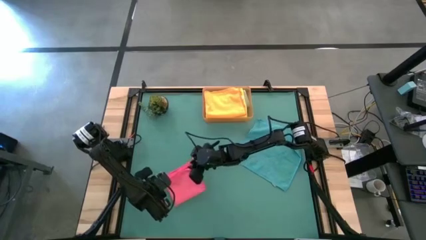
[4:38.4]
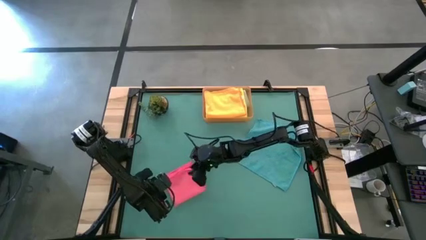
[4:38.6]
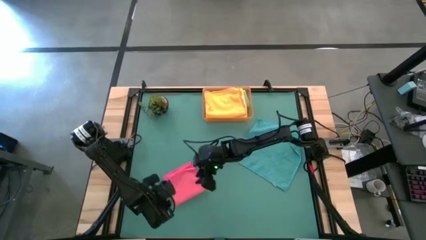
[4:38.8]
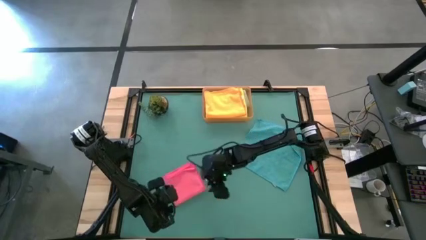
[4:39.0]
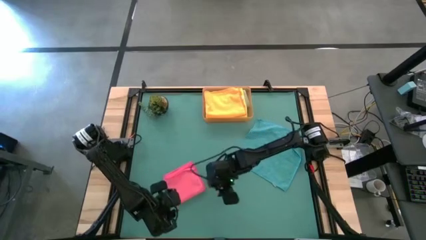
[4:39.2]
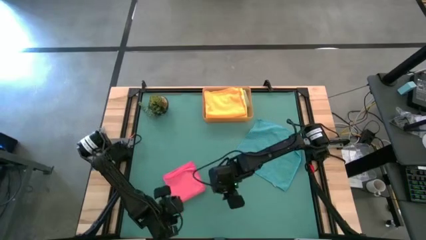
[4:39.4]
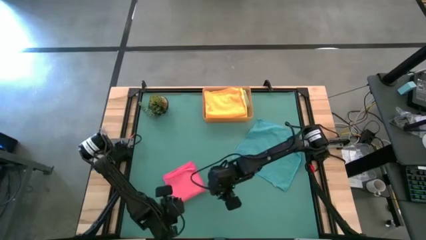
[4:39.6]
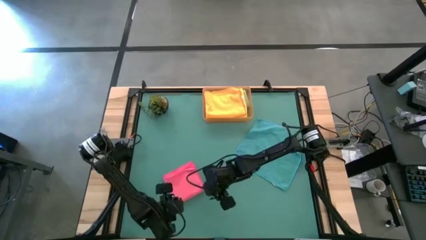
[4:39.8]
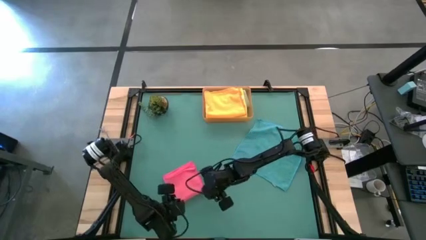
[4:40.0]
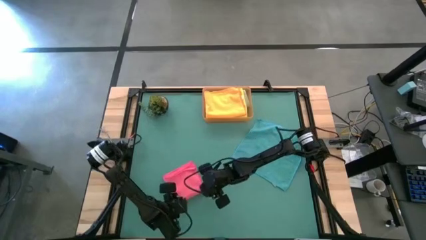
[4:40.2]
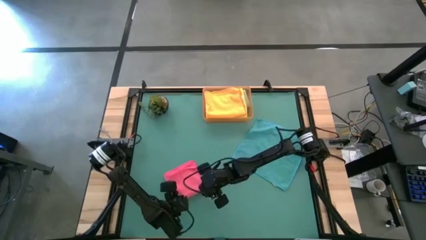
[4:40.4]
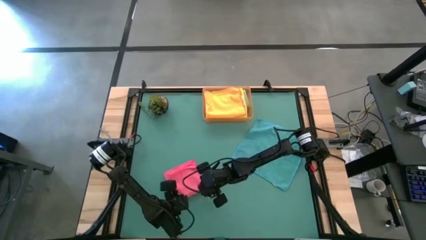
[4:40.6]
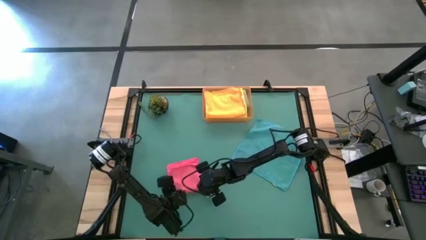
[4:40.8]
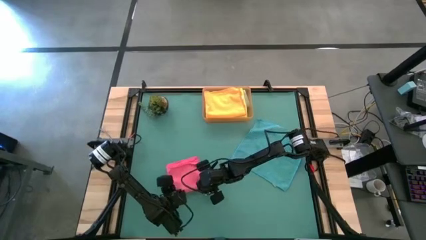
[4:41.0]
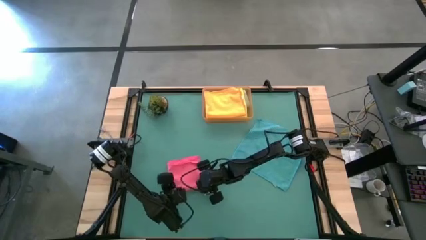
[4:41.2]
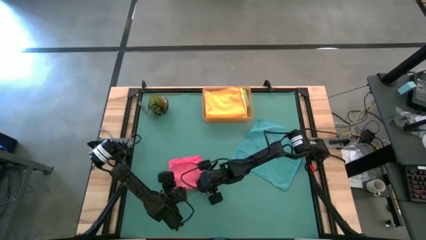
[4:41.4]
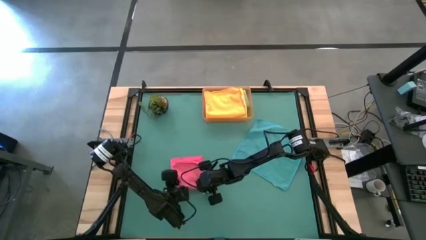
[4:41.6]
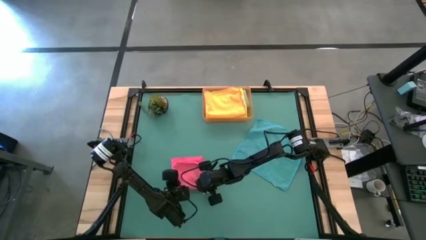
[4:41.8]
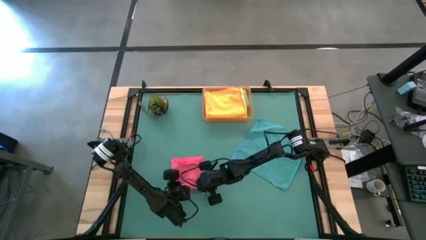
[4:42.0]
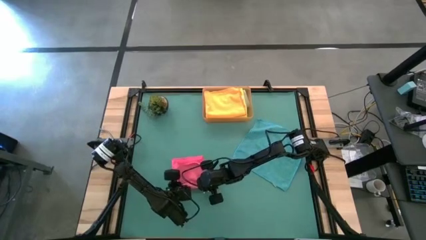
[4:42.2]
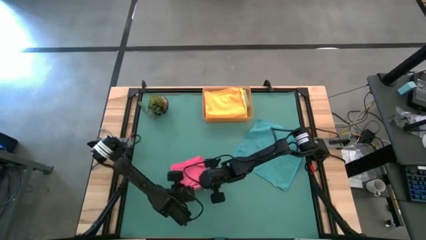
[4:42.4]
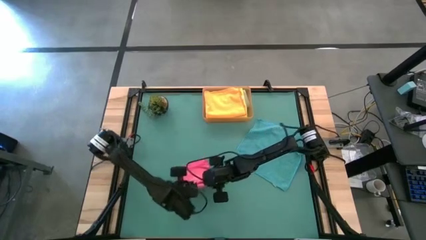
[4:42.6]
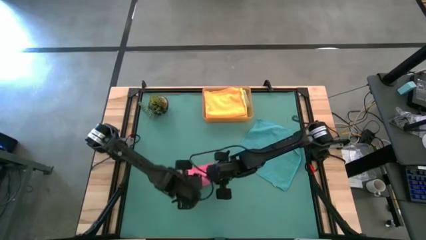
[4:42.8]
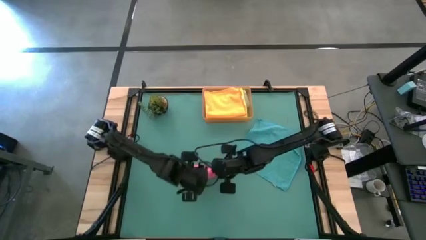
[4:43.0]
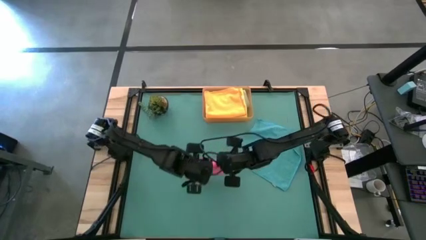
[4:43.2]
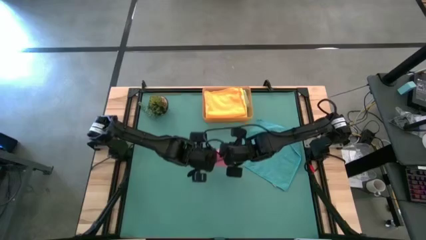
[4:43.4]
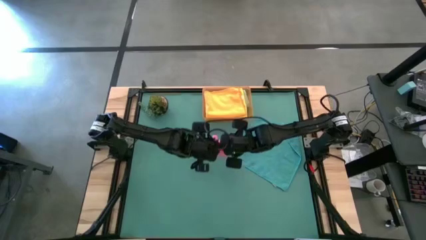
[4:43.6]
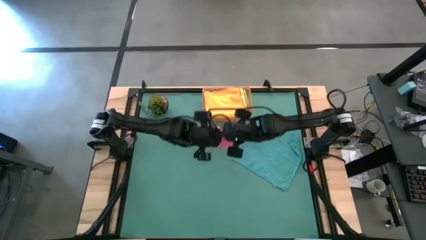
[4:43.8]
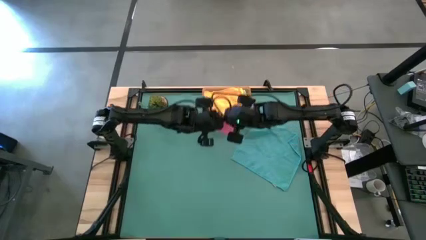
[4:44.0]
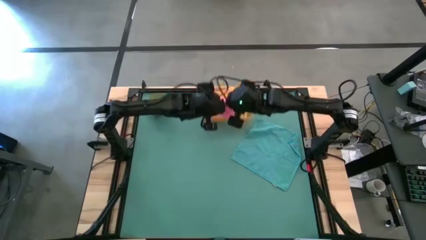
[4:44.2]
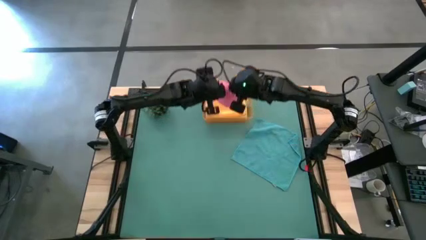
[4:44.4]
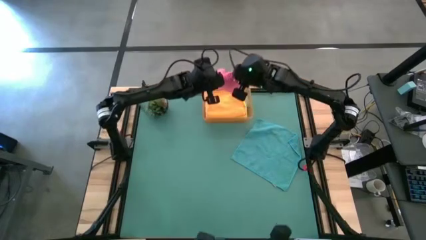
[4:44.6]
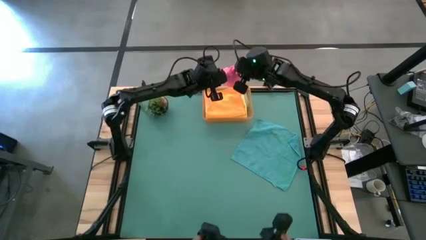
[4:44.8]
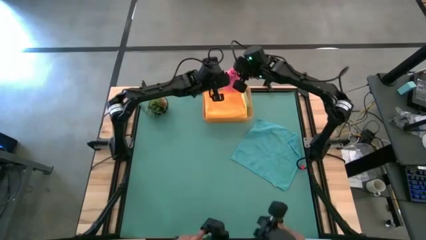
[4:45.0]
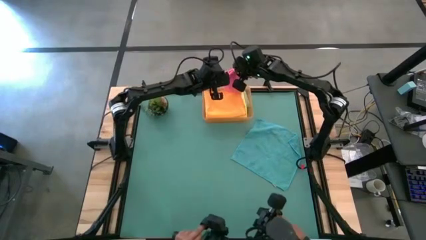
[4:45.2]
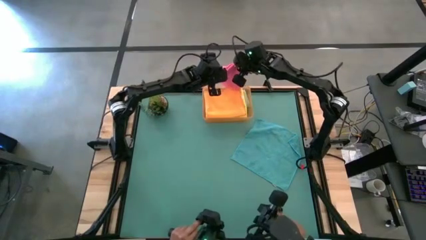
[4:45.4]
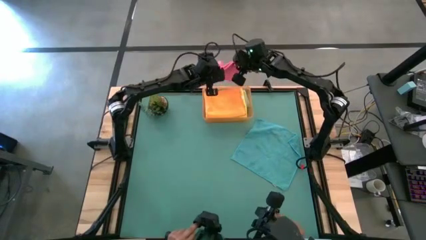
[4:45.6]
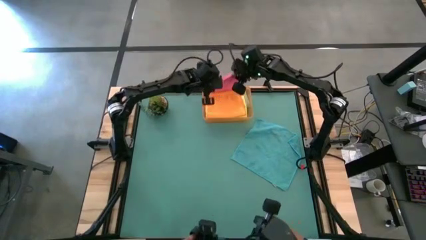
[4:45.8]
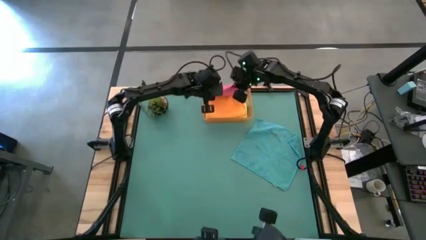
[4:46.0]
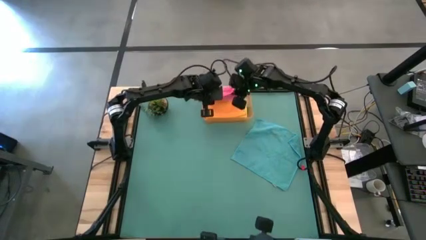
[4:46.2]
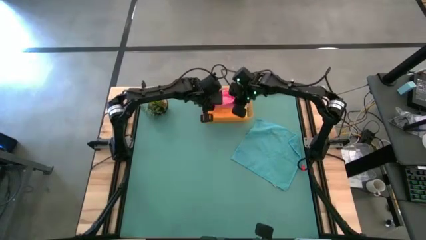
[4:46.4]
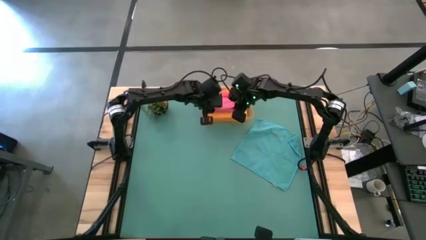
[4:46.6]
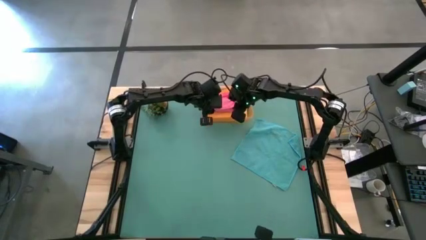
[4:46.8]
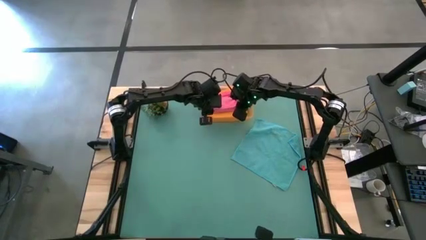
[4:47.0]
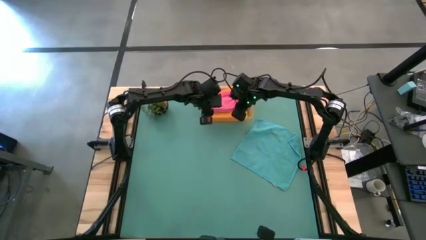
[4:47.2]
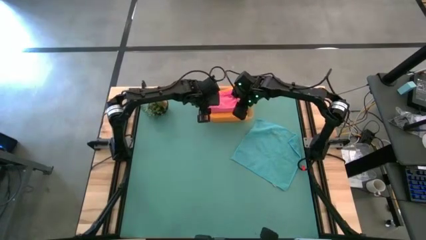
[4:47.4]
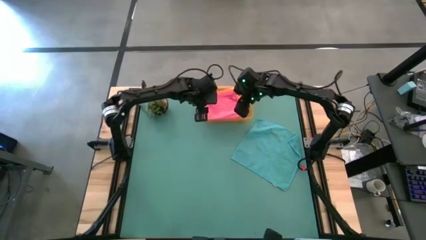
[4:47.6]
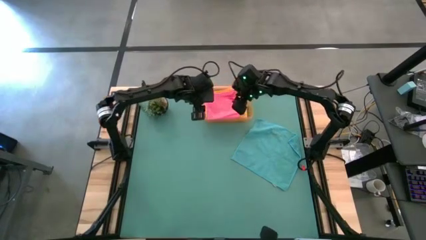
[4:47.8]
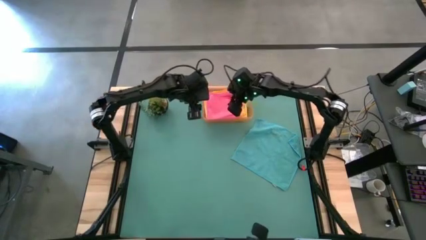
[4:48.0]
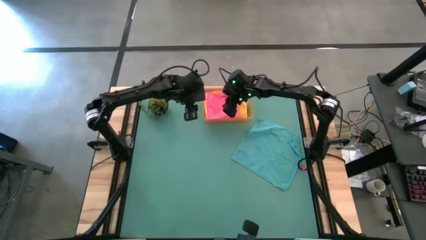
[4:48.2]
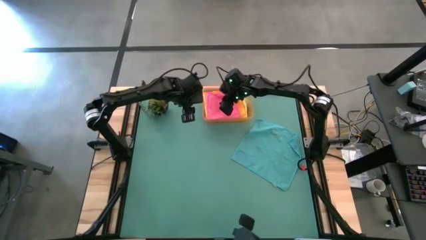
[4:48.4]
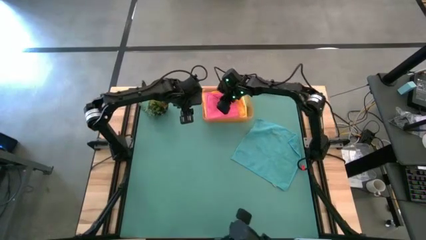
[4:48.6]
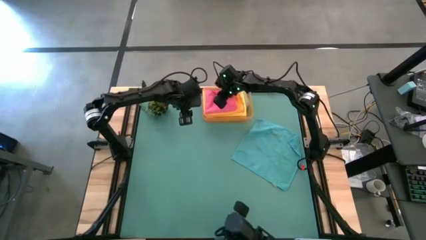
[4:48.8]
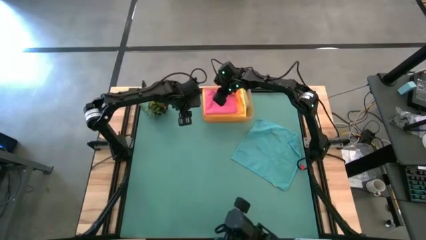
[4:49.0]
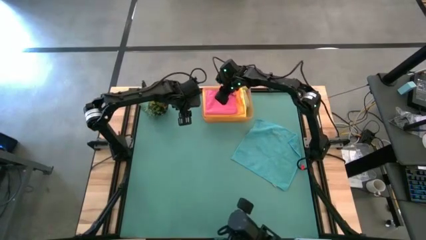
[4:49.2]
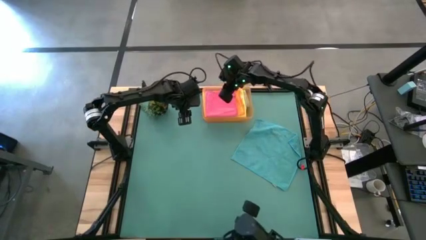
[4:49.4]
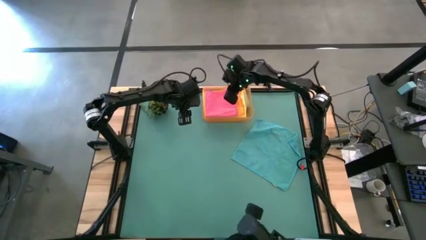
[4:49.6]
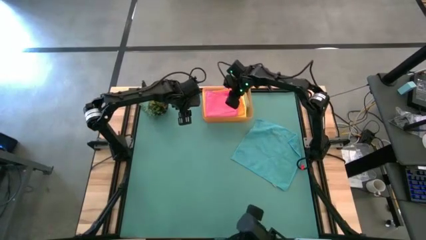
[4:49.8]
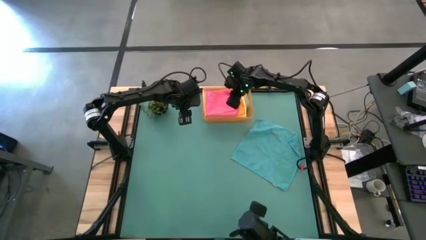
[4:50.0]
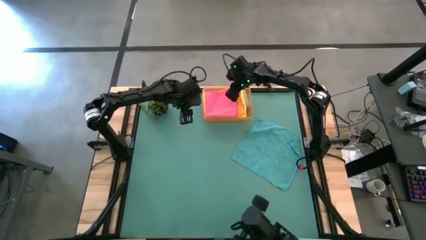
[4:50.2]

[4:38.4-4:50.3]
Task: Fold microfiber towels
Put the pink folded towel into the orange bin
